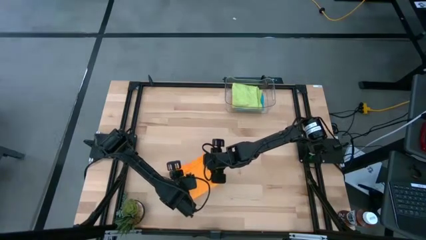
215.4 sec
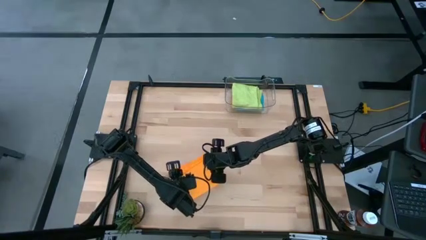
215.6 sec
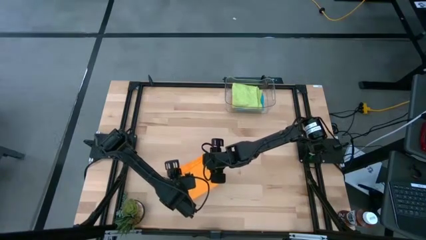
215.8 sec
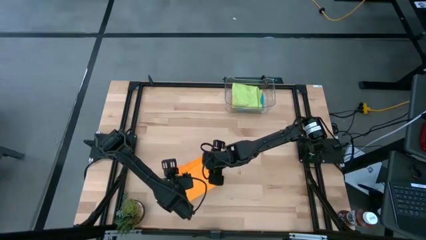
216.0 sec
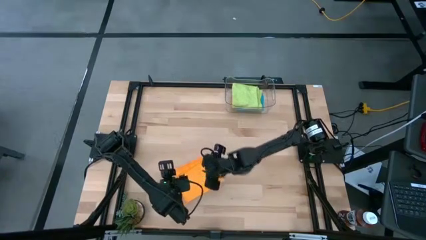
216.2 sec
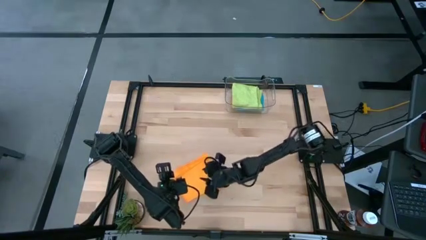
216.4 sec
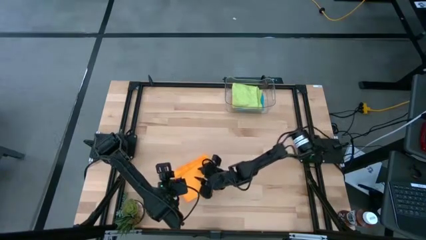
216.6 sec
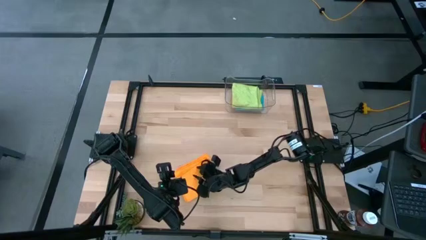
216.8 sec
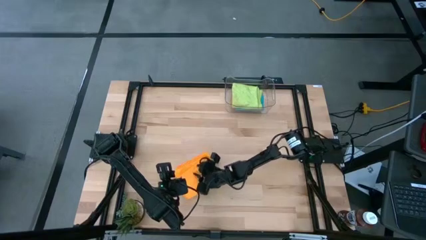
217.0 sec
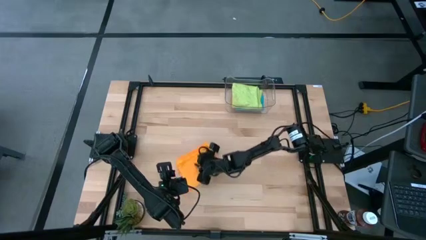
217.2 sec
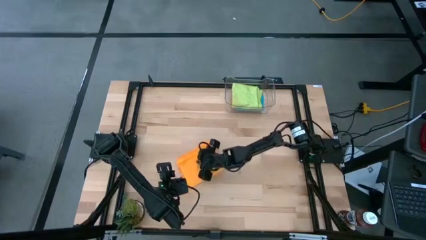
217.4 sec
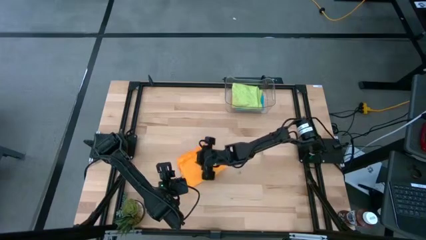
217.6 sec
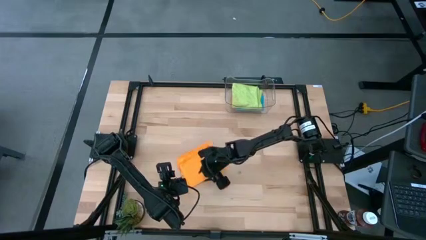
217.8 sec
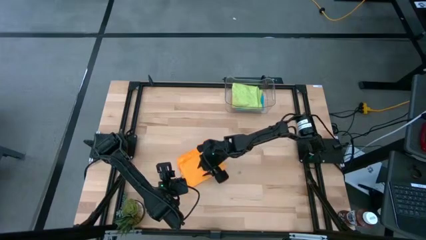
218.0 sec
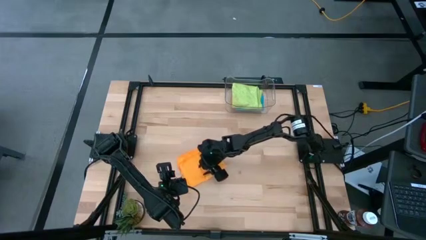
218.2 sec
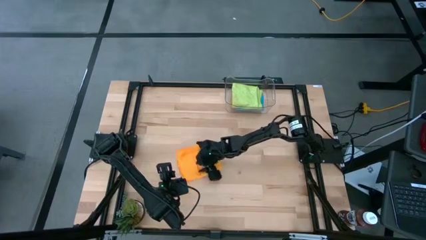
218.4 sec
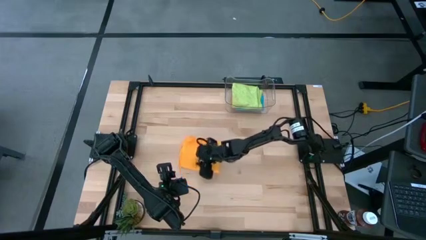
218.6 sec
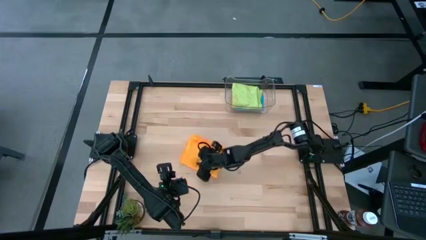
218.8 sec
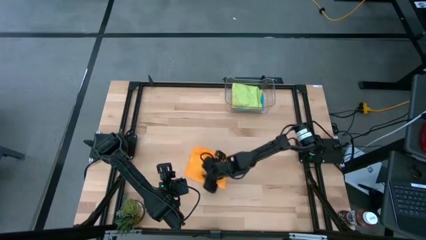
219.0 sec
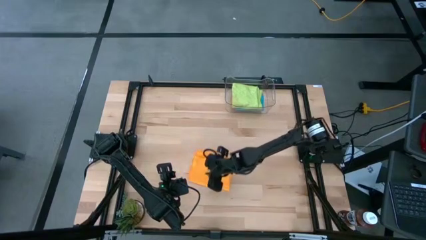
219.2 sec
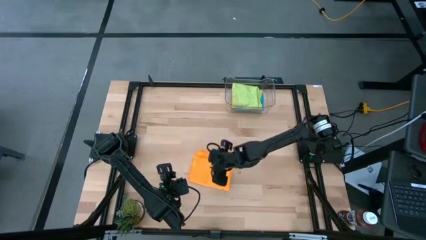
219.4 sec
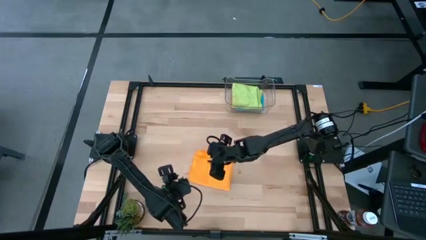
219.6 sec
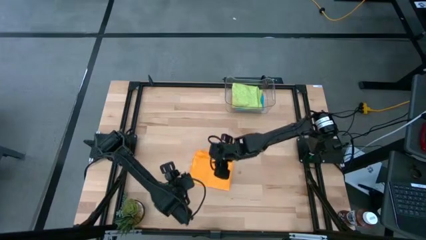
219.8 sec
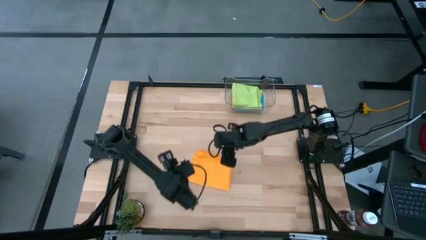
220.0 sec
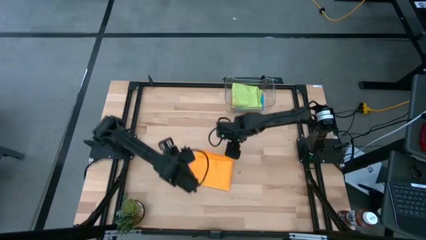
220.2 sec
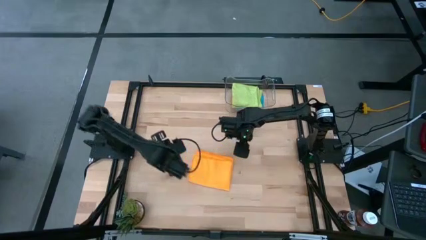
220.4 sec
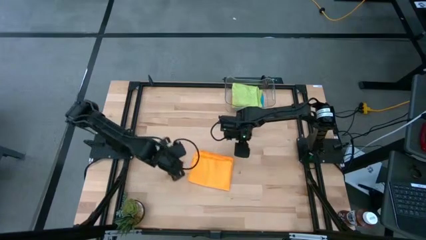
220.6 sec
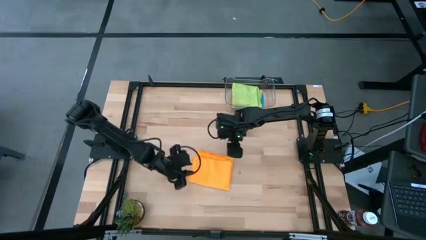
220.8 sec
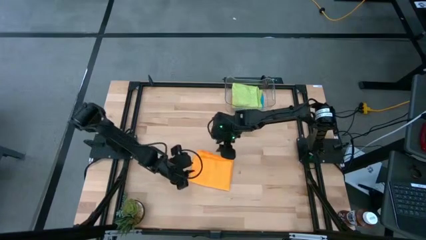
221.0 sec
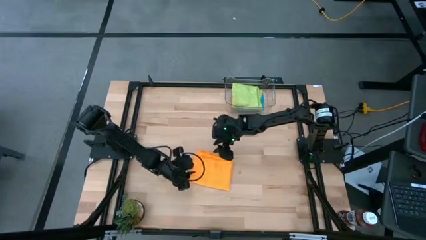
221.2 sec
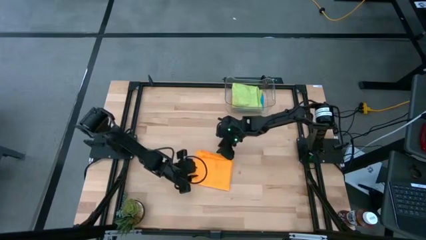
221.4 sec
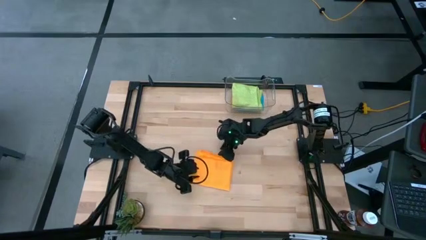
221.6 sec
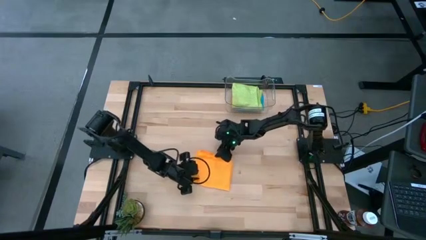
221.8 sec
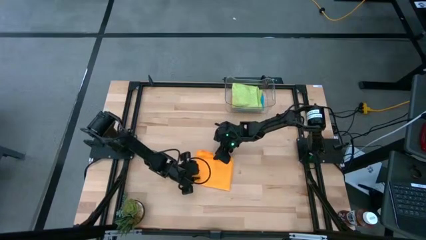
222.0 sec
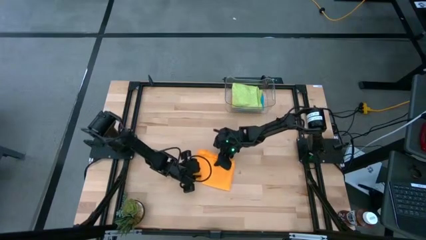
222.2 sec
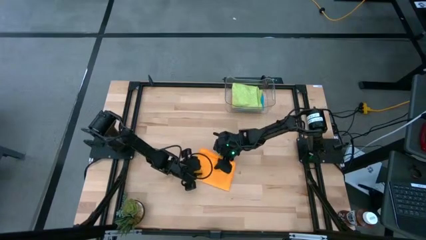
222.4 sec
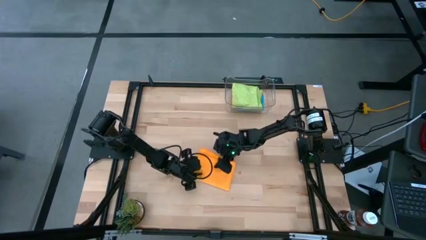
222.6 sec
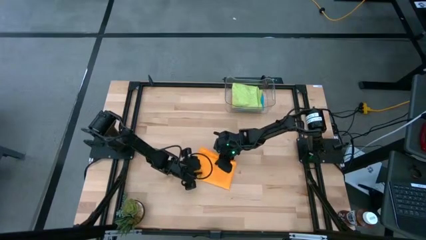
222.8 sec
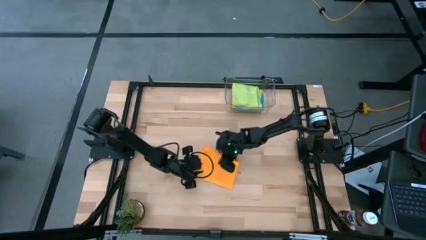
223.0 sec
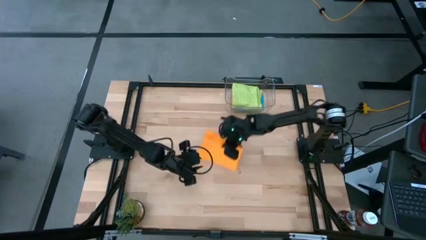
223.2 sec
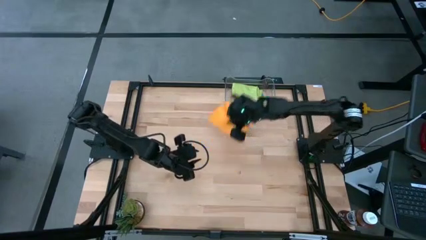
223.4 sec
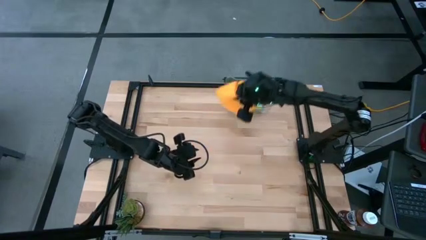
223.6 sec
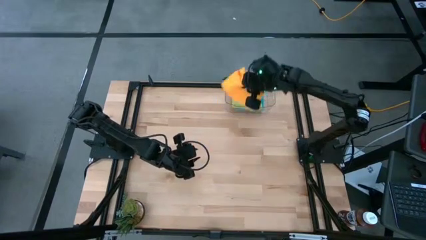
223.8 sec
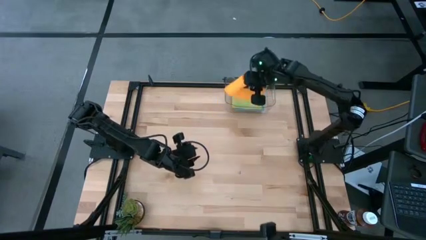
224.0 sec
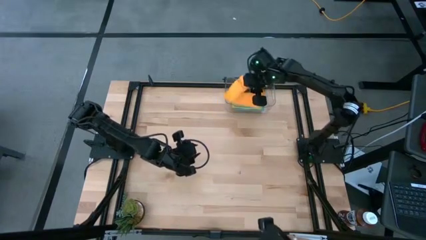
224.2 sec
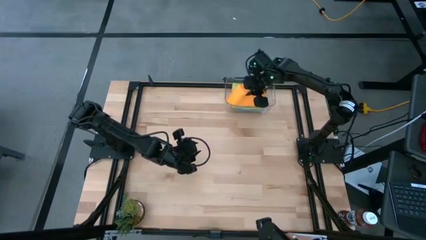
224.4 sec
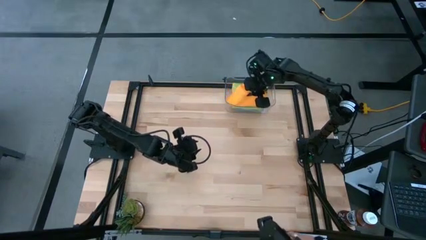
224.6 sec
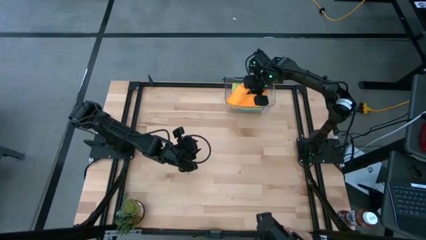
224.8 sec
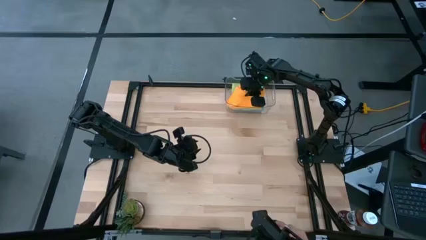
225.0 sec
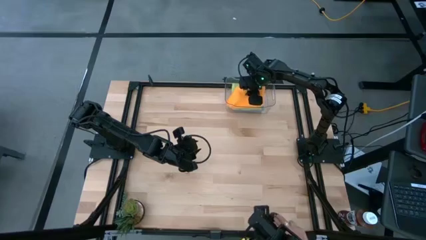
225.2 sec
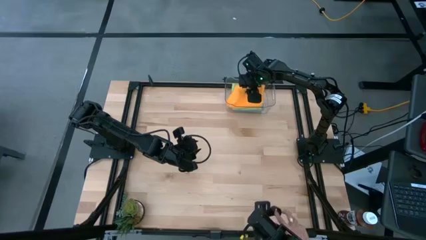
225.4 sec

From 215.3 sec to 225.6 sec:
Task: Fold microfiber towels
Put the yellow microfiber cloth into the transparent bin

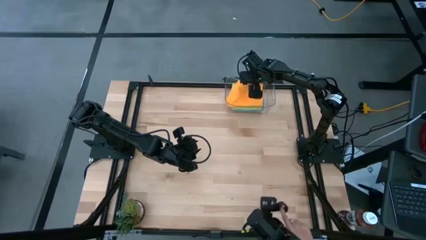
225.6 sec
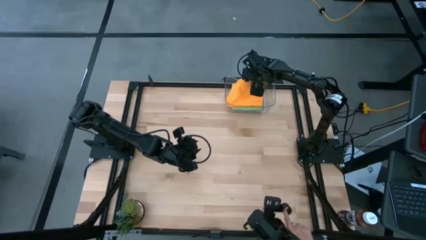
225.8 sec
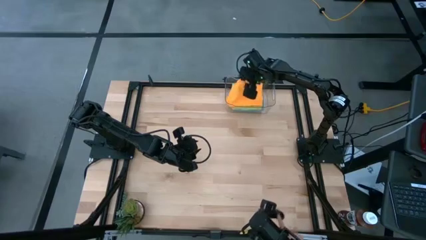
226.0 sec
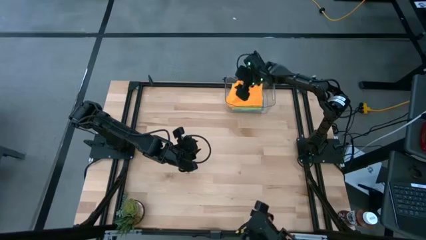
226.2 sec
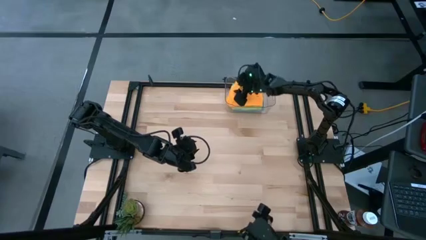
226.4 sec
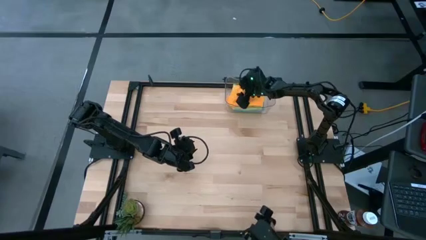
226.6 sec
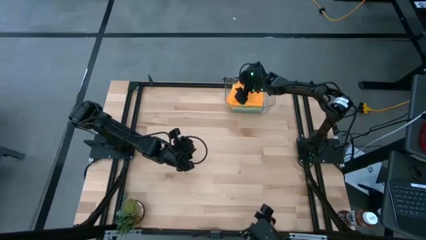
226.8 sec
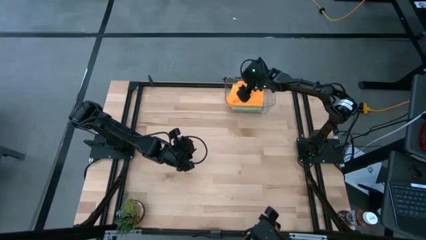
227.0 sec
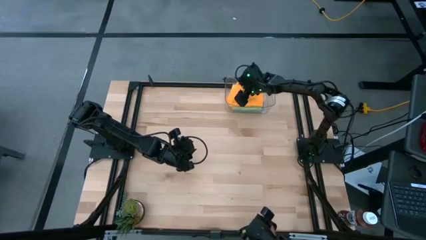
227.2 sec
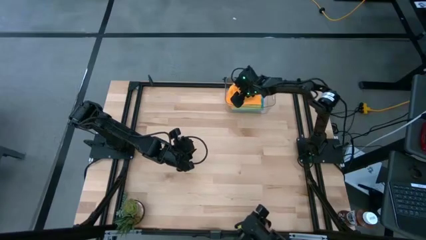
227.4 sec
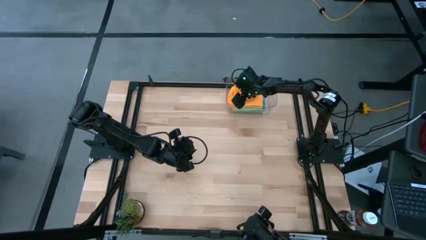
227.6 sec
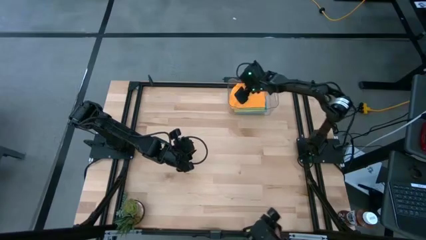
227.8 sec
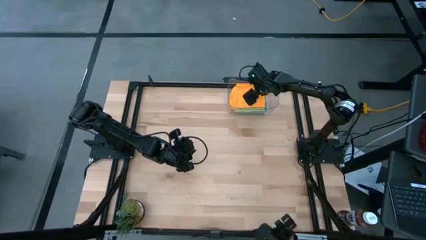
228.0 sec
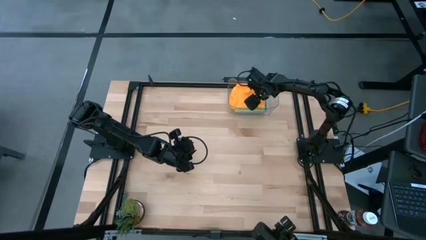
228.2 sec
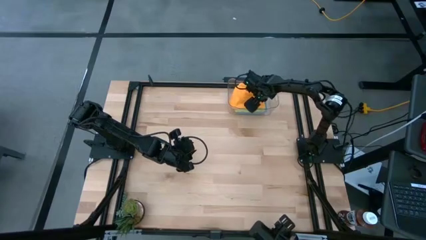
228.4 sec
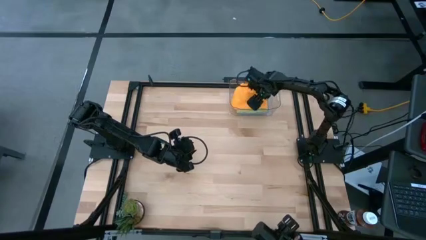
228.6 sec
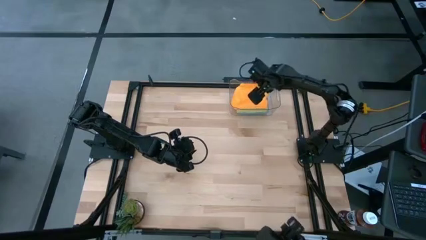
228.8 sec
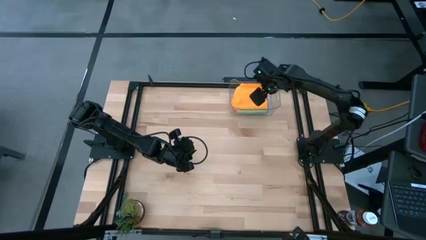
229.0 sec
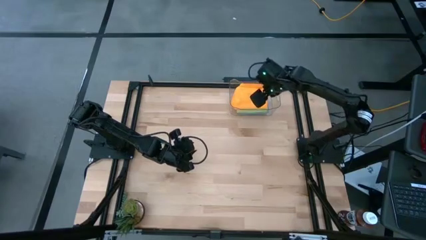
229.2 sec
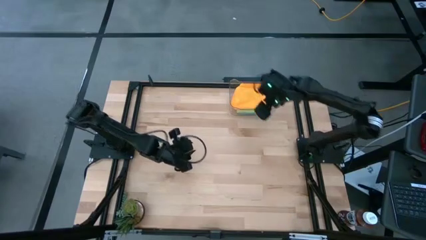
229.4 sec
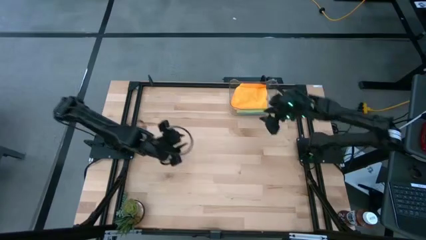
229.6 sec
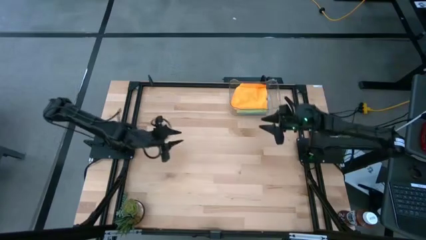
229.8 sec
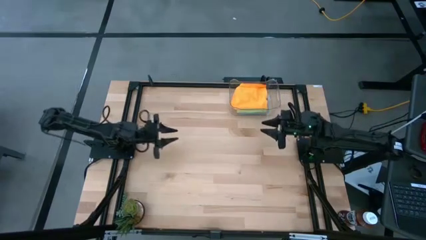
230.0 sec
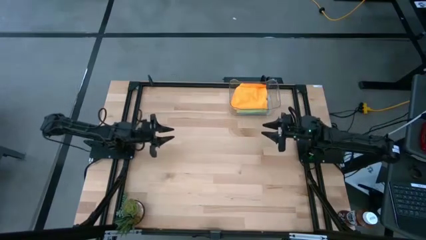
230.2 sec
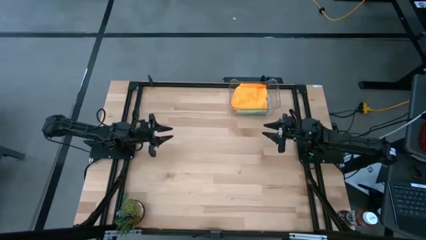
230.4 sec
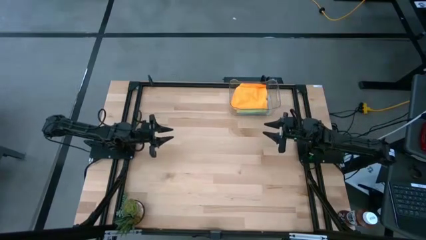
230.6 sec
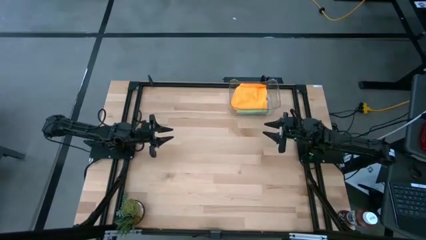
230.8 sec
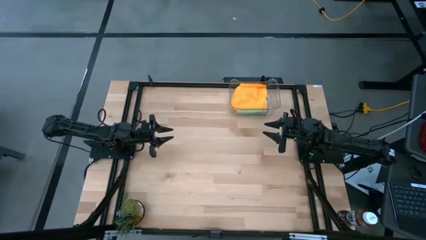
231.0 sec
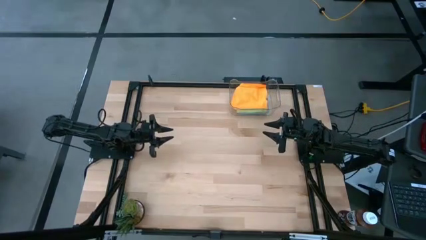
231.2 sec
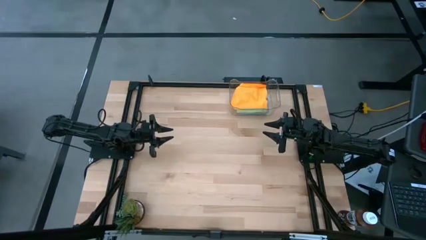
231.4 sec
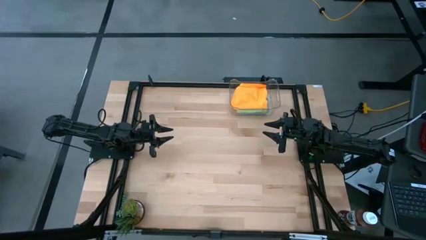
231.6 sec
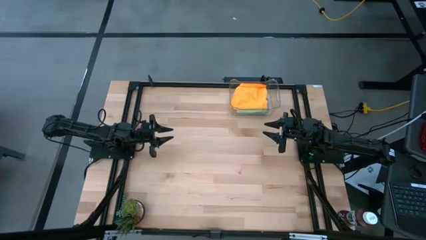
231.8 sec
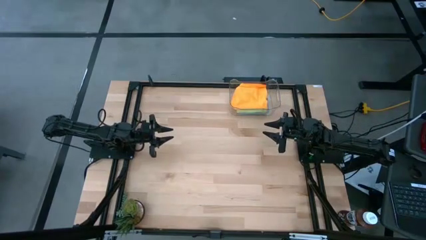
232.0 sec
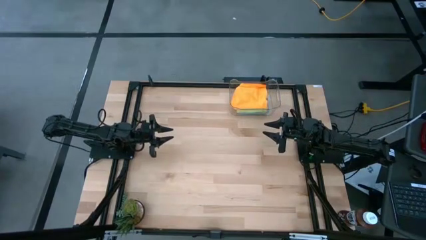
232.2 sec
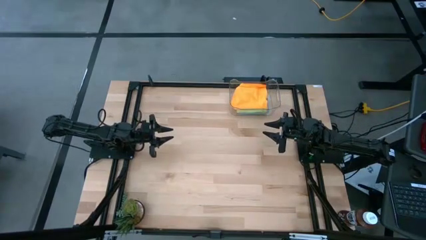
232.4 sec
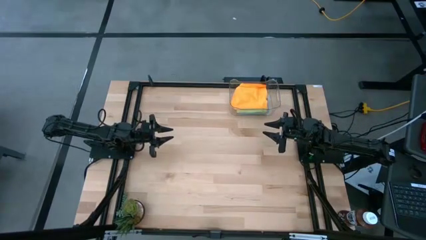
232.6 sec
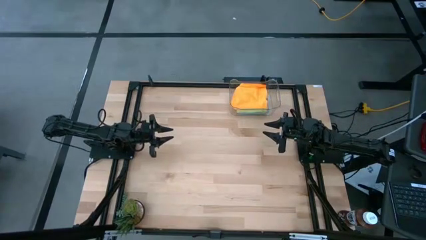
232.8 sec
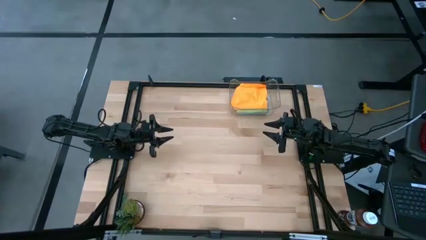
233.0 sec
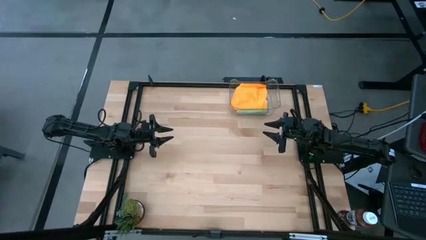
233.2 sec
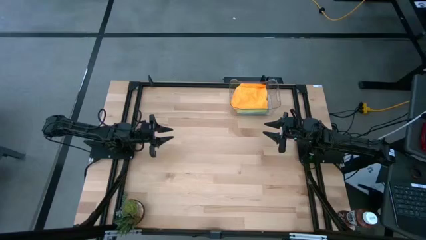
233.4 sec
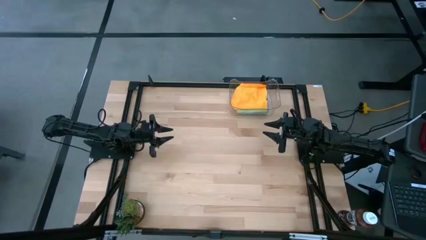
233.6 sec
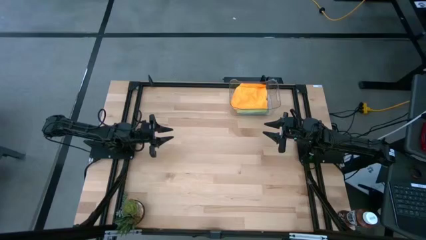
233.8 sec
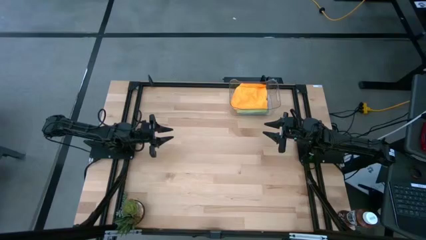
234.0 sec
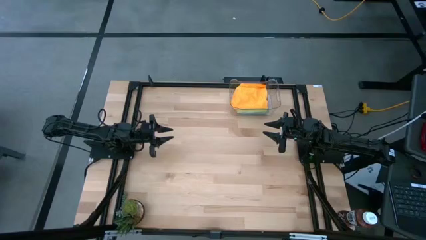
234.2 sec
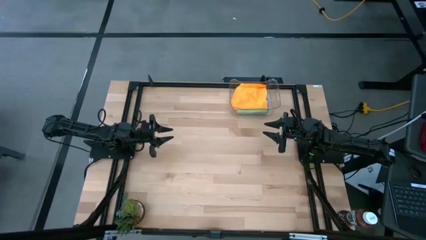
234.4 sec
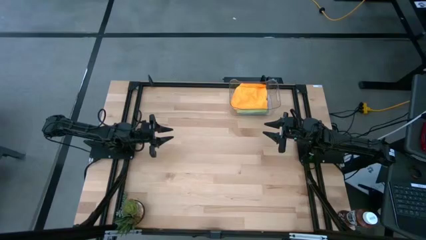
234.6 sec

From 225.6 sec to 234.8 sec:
Return to Home Position
